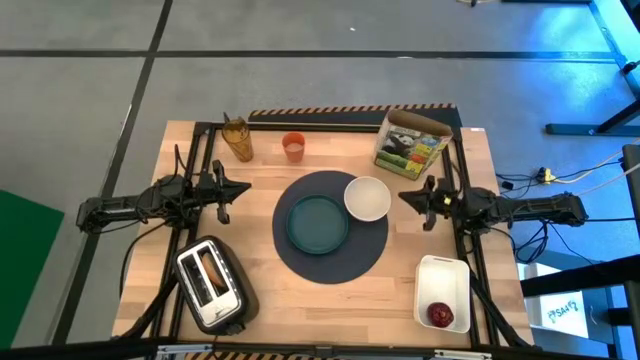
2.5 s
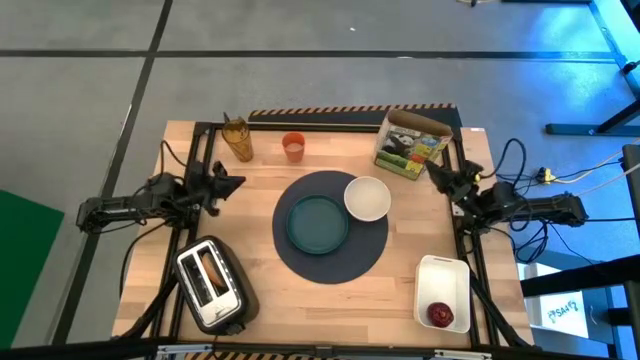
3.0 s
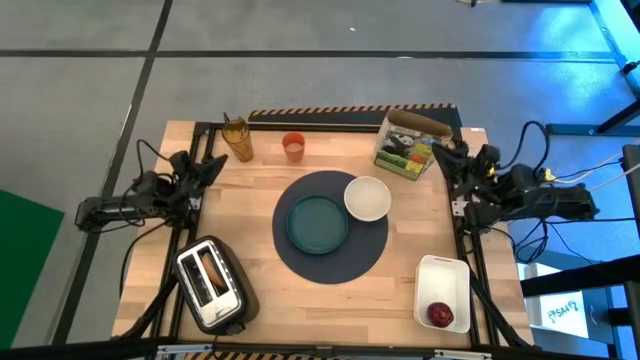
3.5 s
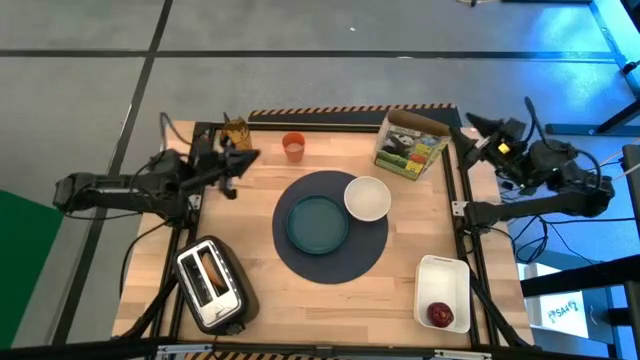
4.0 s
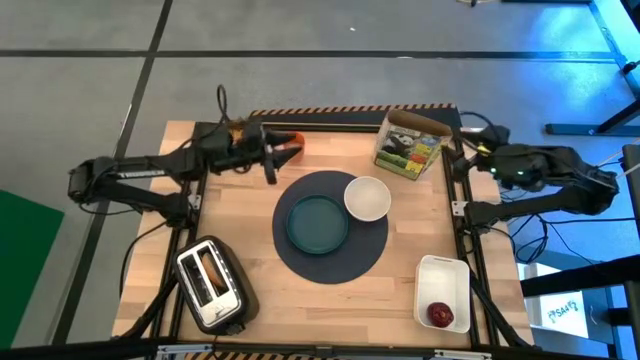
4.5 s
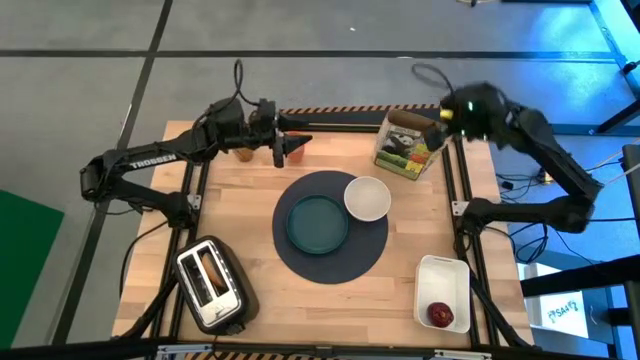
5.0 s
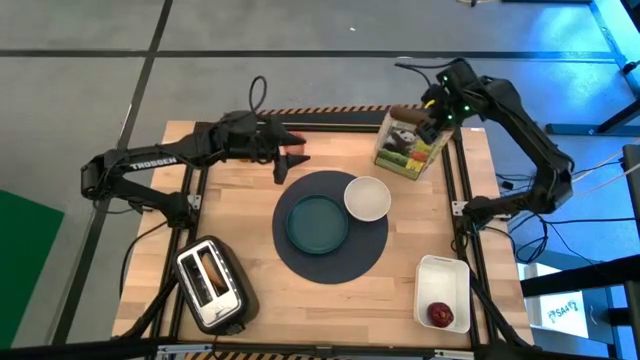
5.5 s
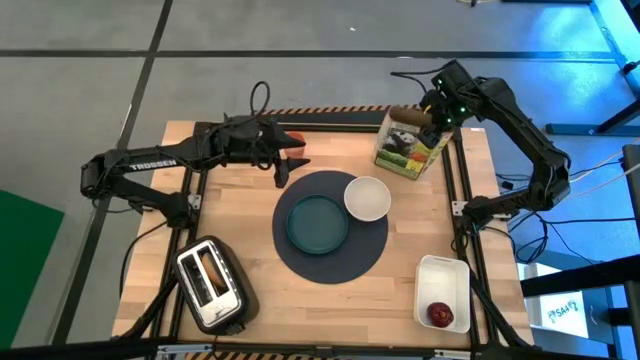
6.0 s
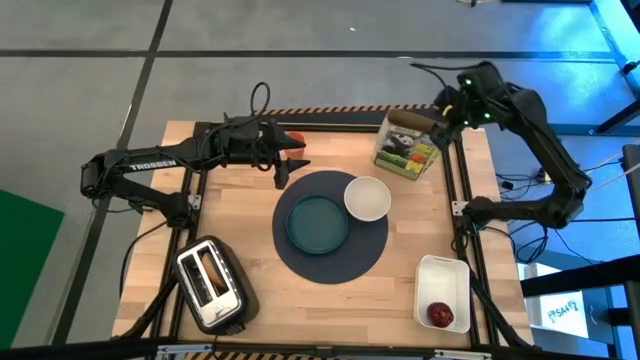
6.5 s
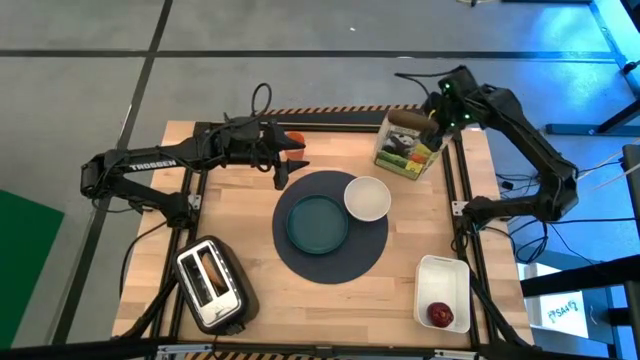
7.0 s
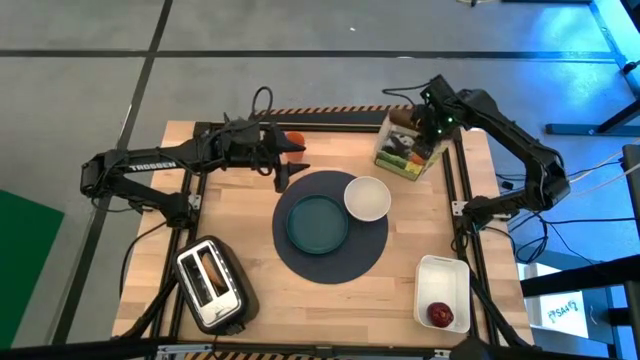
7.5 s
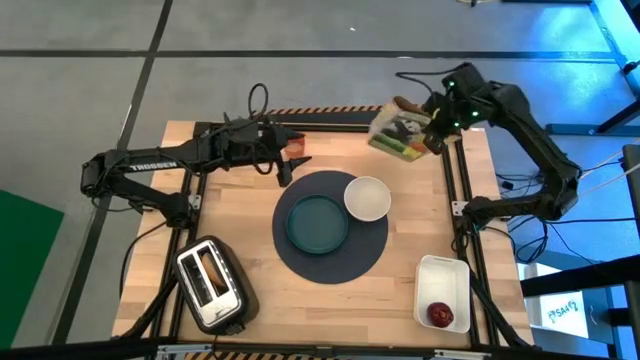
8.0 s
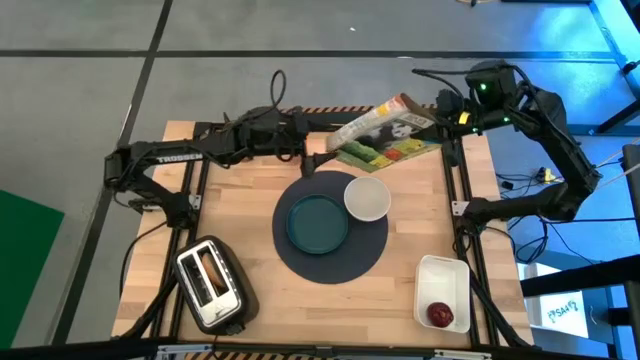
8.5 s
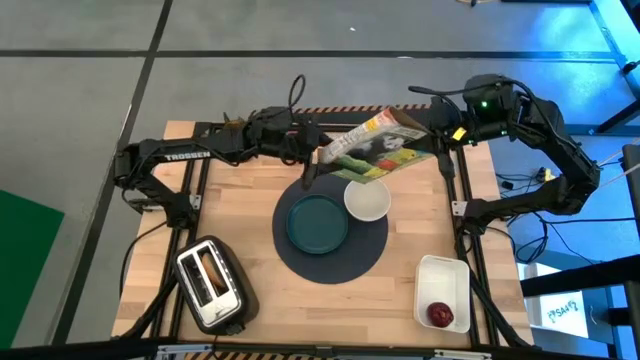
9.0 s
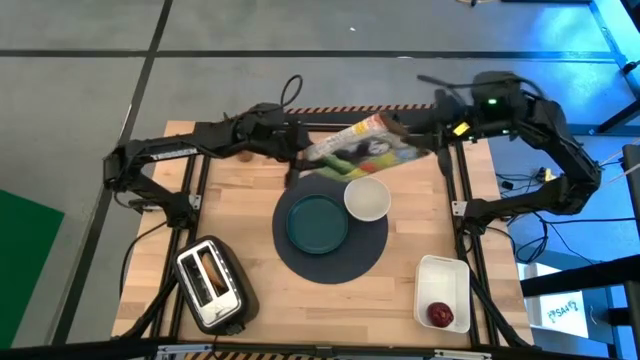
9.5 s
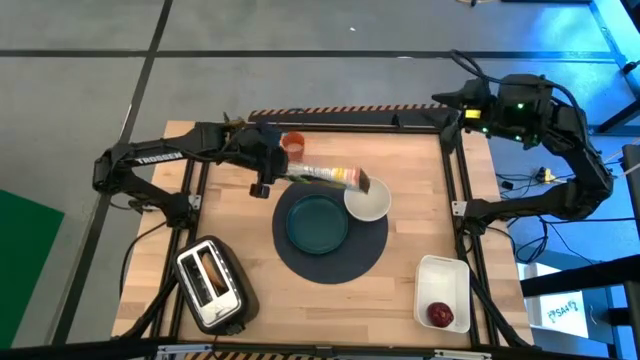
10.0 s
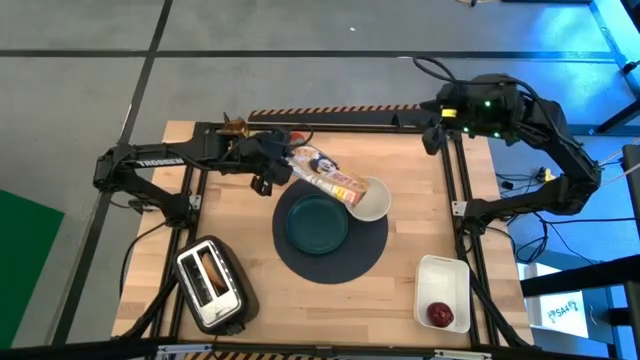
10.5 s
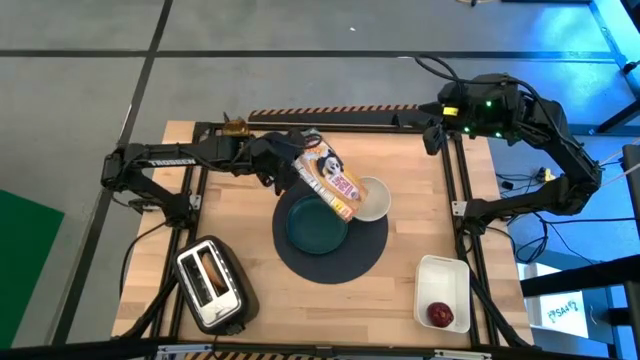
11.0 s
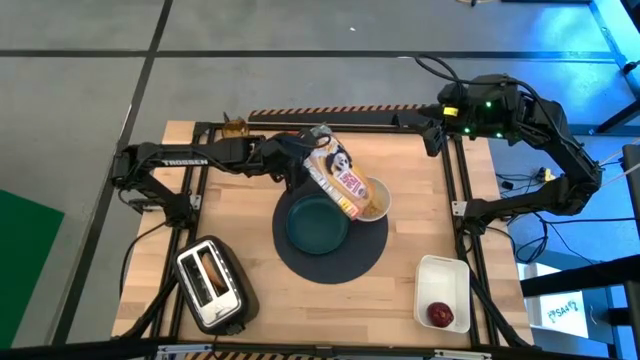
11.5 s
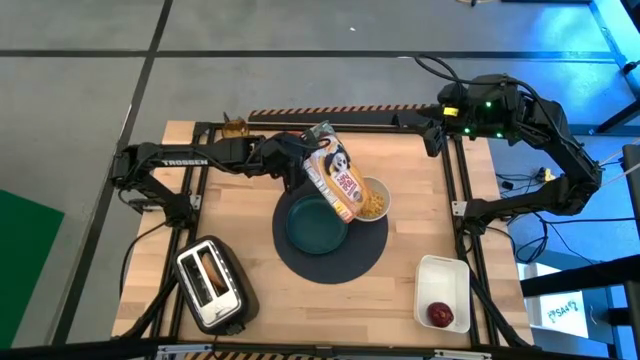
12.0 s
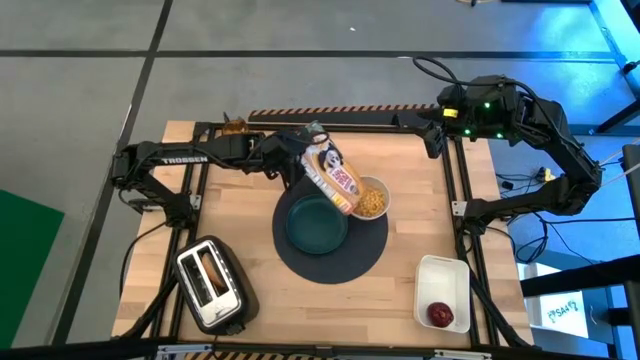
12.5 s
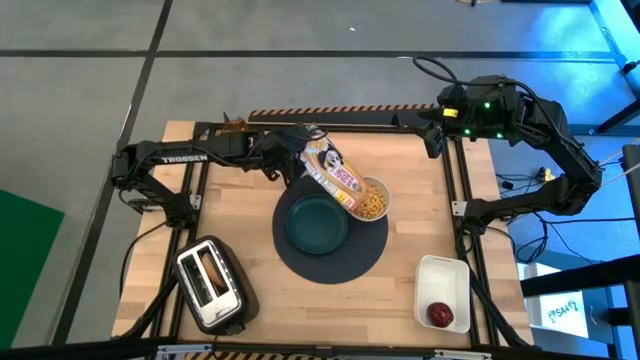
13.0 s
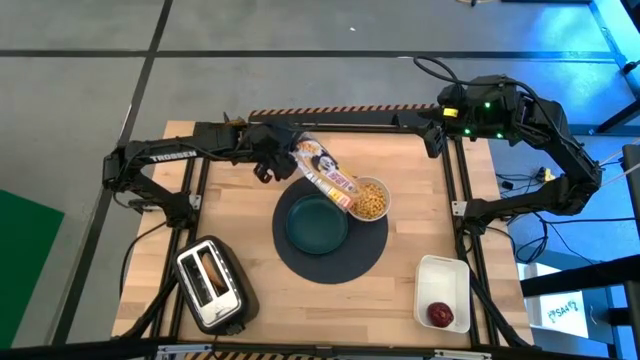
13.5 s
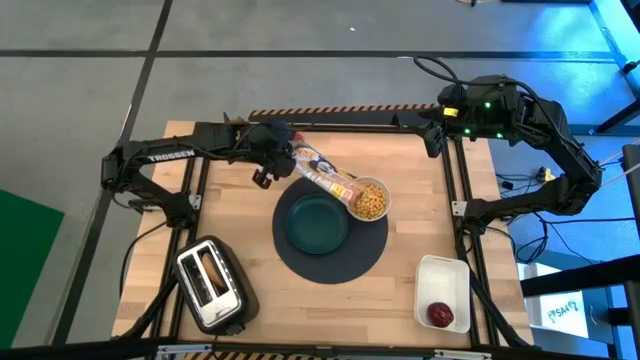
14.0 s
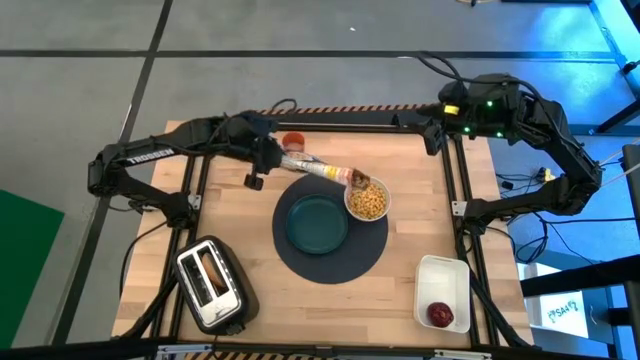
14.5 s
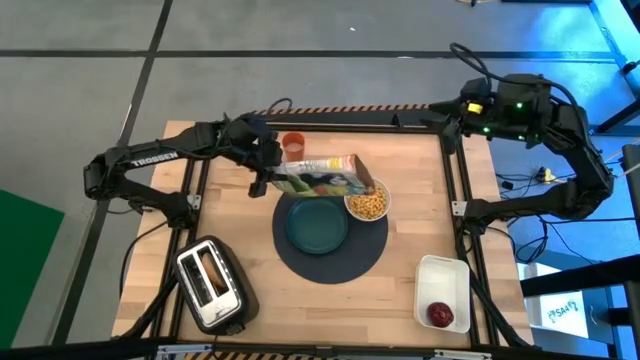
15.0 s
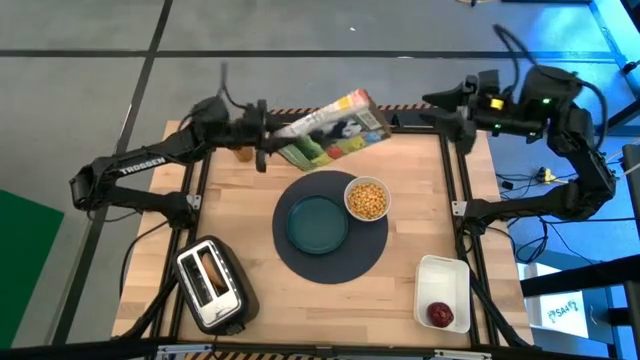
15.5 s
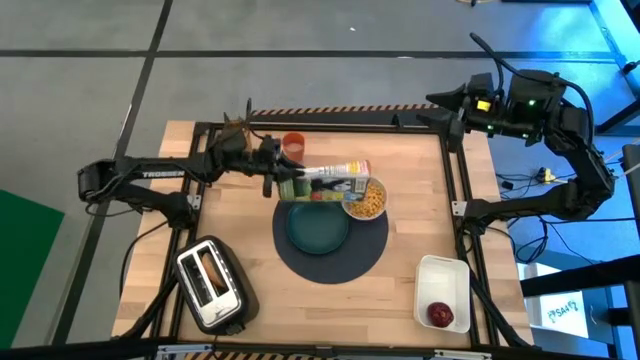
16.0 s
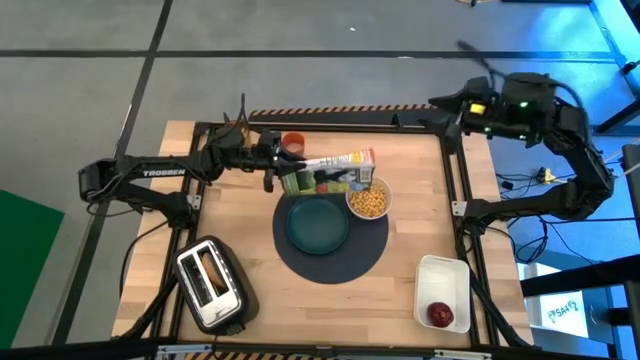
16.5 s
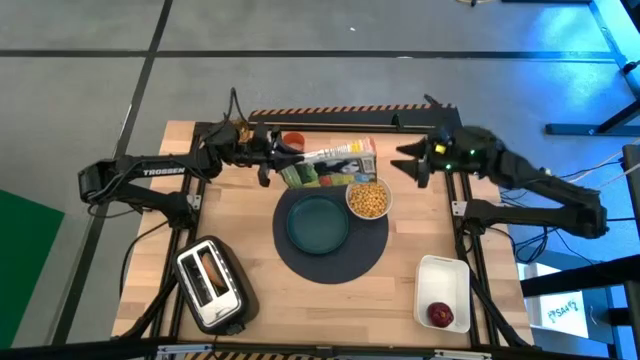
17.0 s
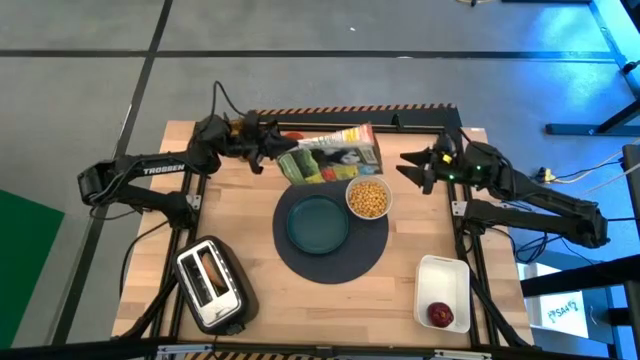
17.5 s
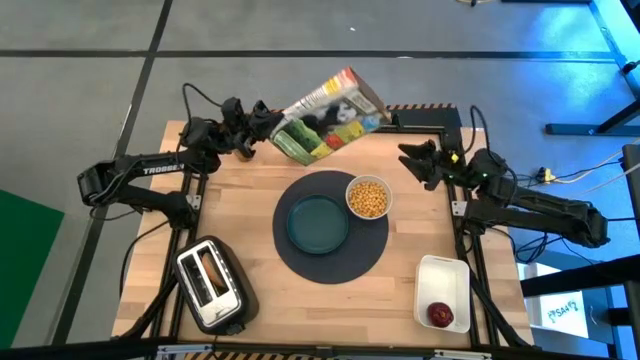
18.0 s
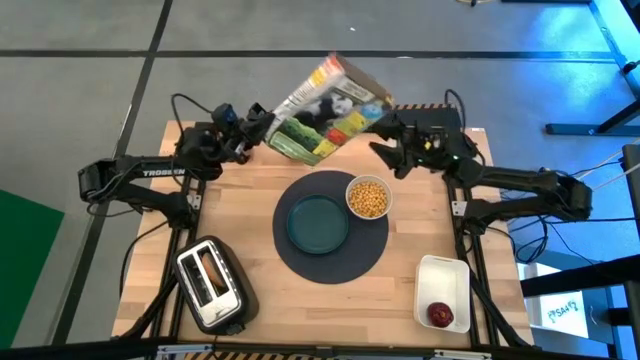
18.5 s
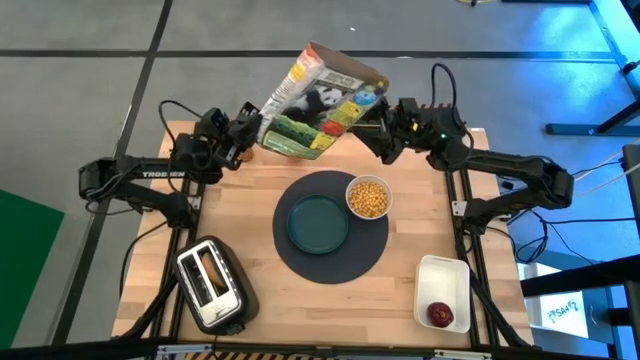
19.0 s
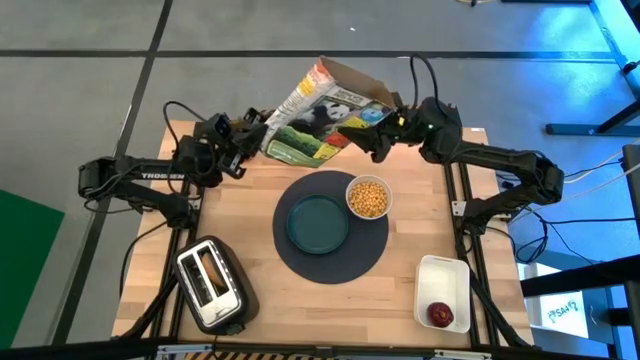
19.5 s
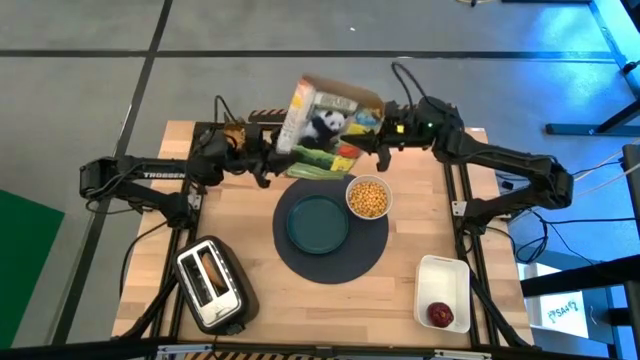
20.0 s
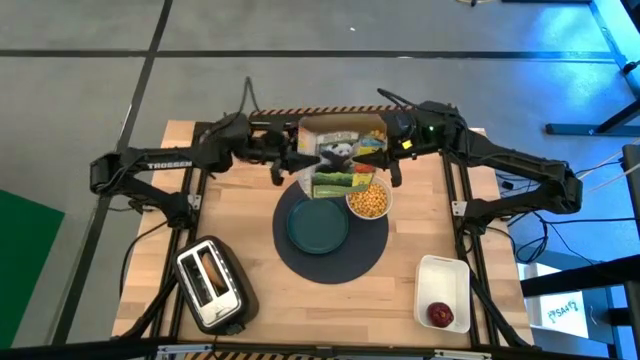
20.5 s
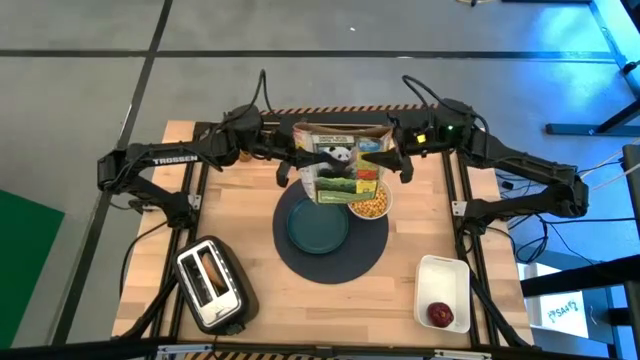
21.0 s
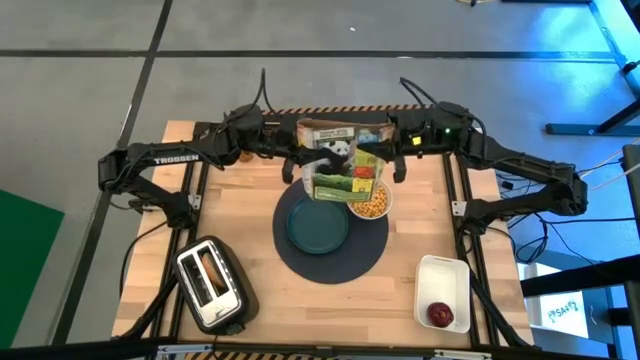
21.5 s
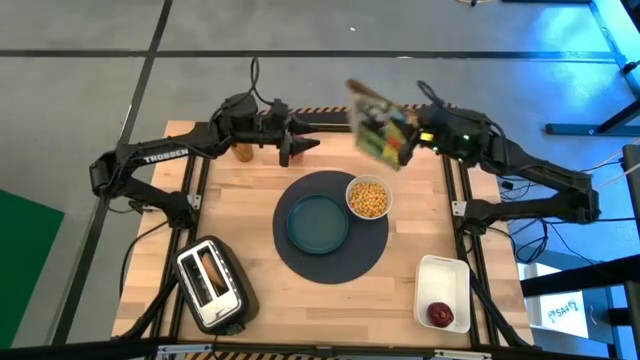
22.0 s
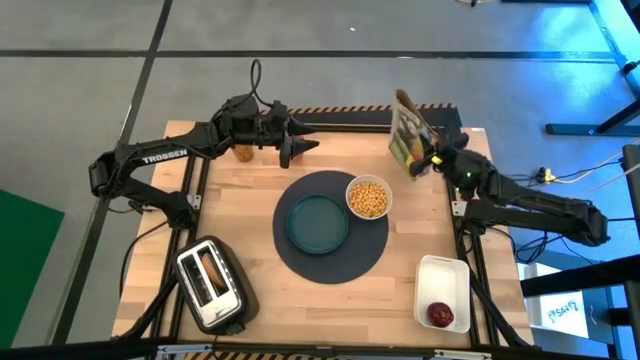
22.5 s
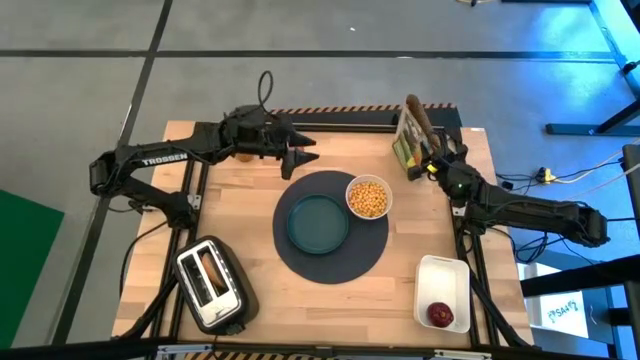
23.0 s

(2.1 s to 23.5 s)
Task: Arrange a breakfast setting
Pour the cereals from the cereal box into the white bowl
